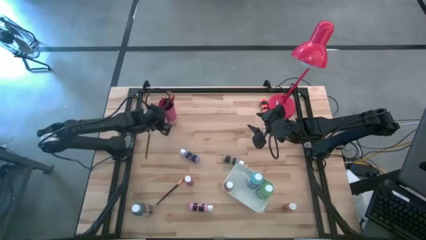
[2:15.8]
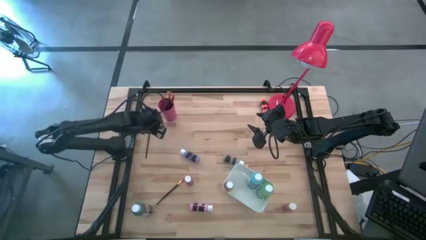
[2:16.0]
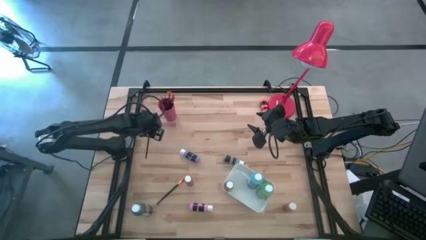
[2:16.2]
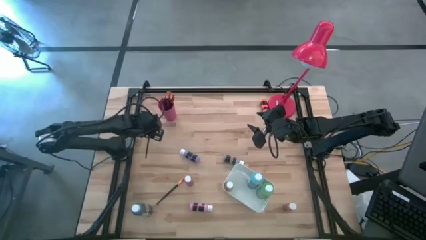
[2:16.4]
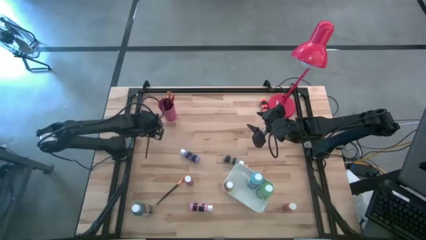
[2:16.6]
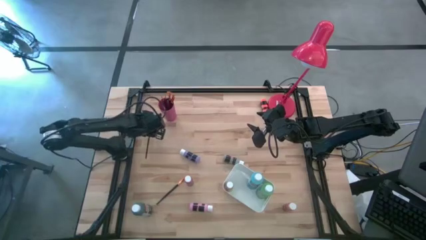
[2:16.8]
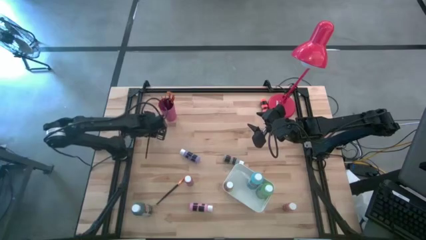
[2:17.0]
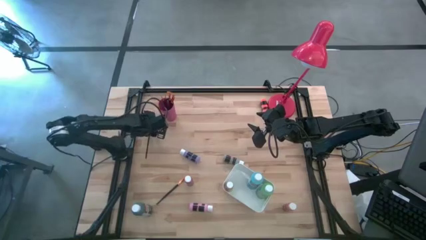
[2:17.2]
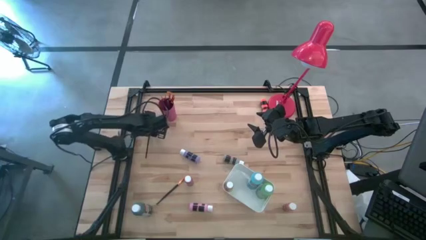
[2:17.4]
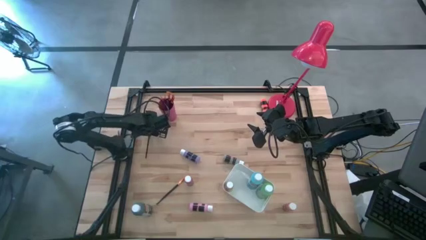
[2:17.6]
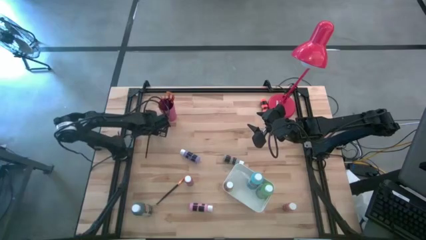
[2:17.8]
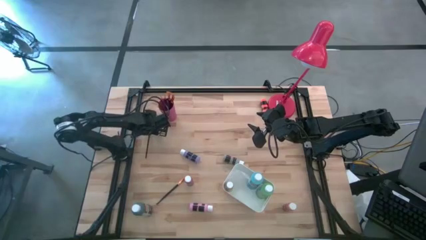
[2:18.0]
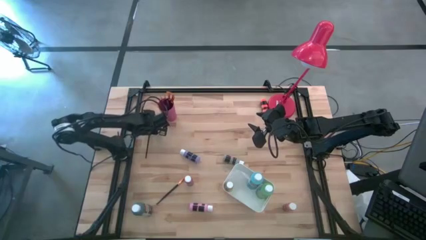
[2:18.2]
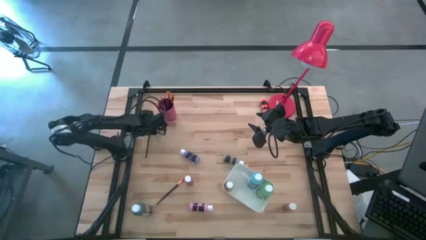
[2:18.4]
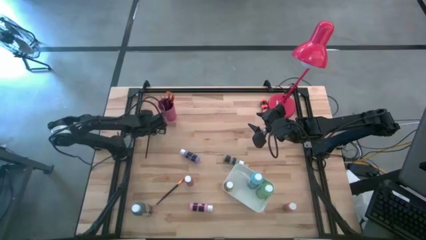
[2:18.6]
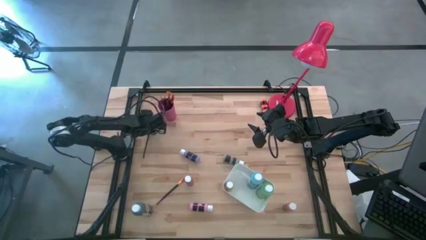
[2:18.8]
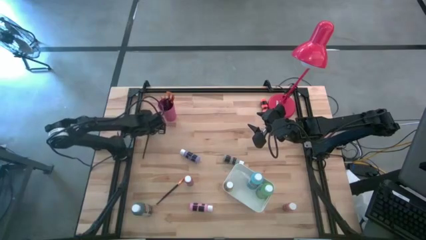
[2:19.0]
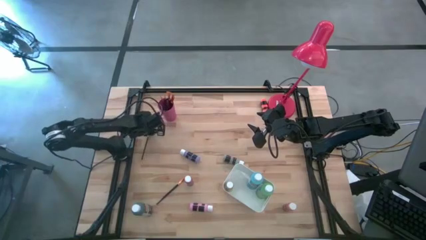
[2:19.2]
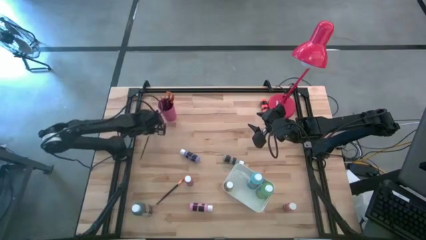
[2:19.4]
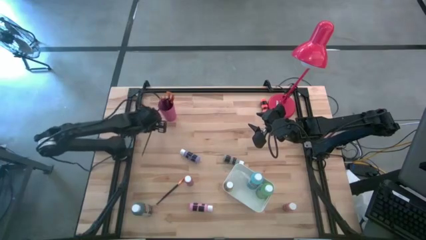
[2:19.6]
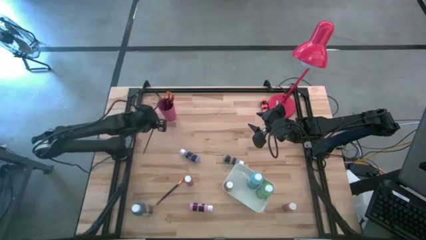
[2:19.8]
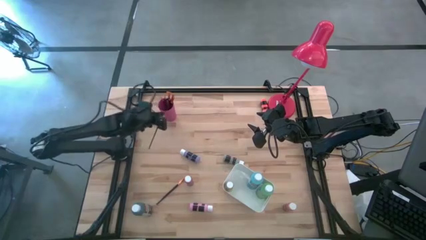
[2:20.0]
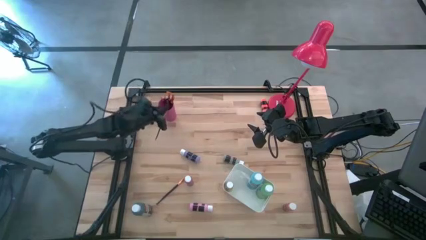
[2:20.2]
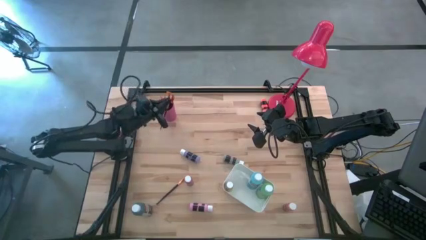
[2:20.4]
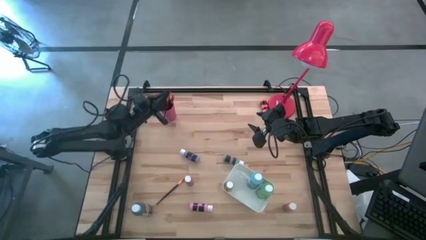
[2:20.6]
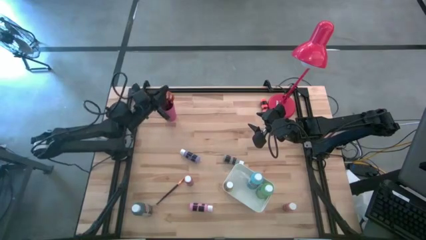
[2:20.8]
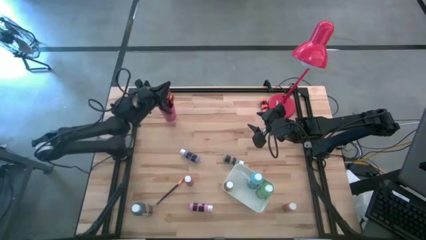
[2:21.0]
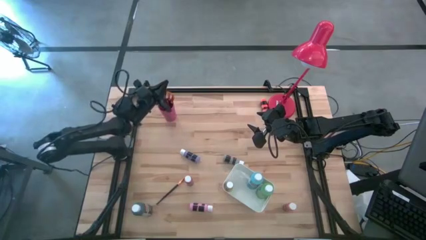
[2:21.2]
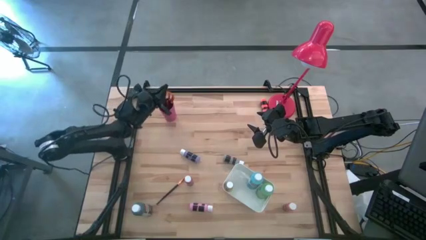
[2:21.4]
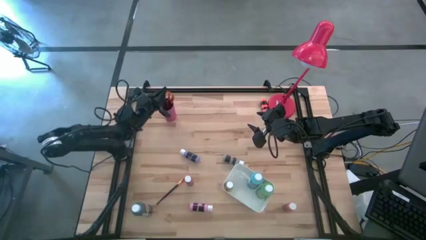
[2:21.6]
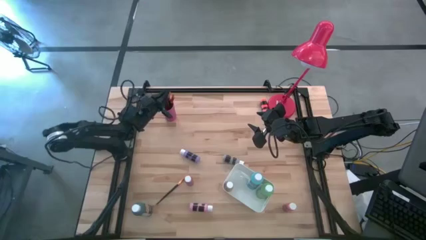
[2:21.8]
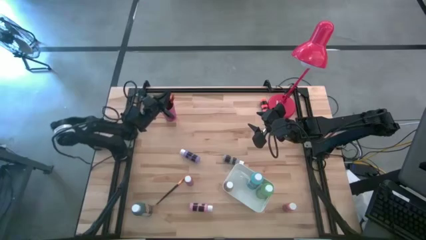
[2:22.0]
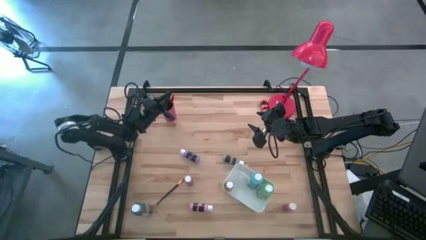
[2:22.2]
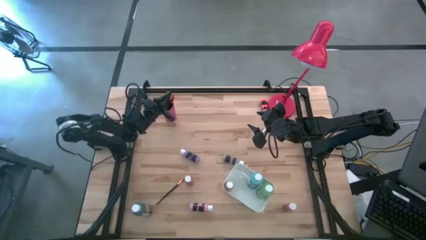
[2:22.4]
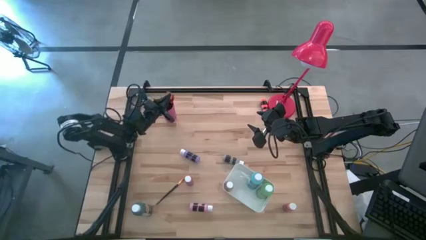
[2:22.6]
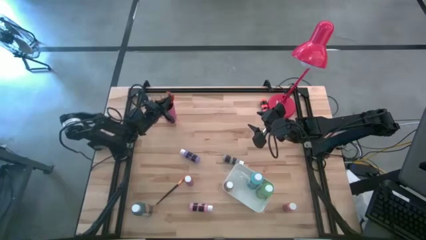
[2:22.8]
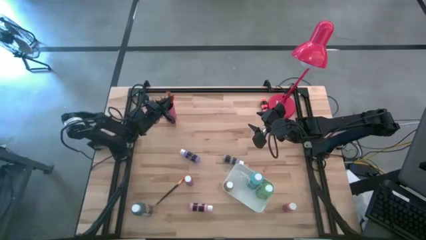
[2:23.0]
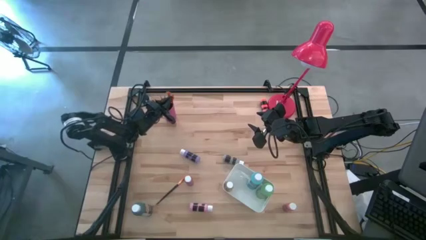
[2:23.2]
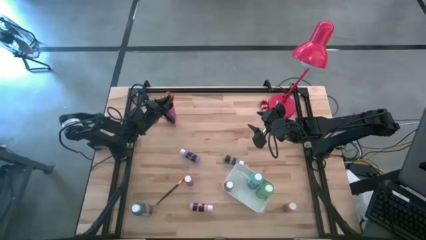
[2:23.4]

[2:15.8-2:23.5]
Task: Pick & Place Paint Supplies
Put the orange paintbrush into the pink cup

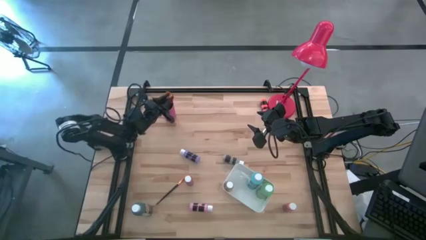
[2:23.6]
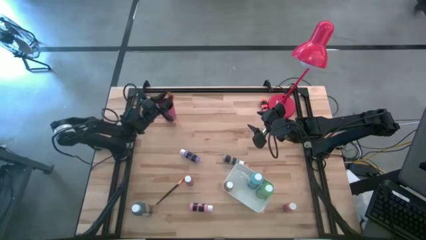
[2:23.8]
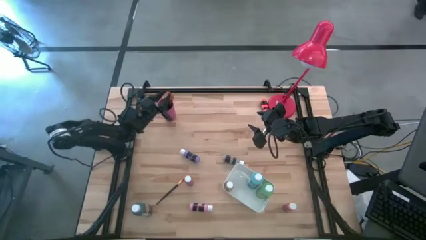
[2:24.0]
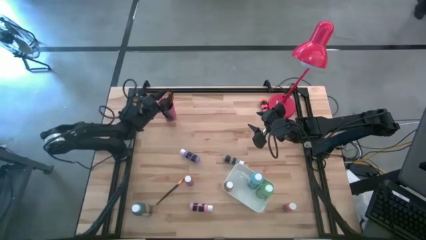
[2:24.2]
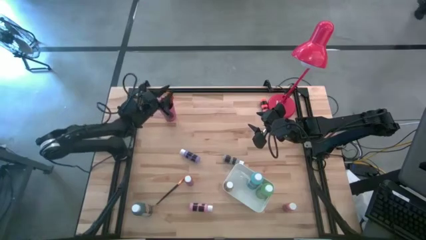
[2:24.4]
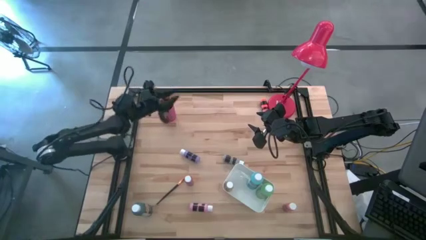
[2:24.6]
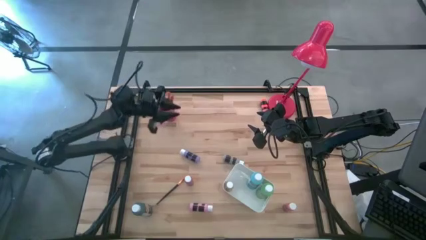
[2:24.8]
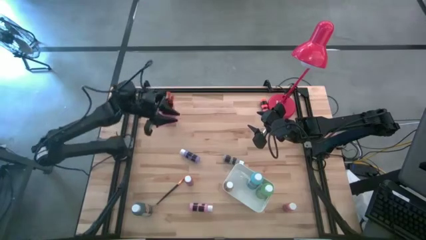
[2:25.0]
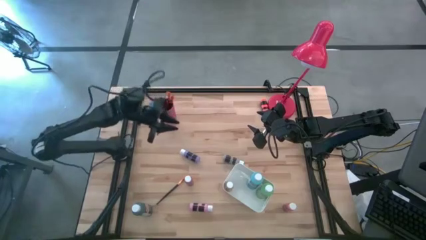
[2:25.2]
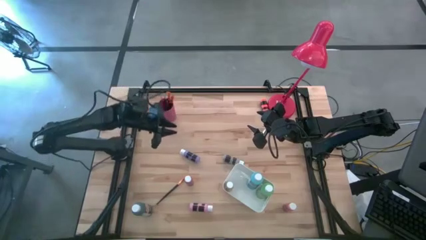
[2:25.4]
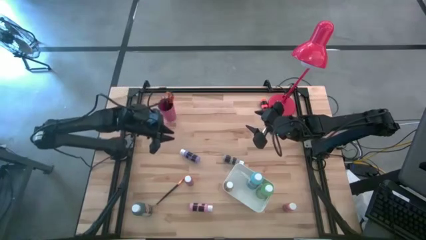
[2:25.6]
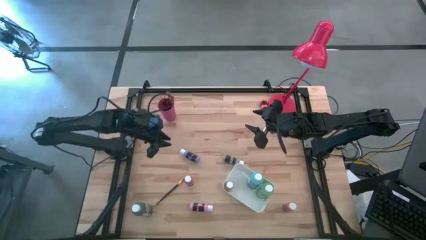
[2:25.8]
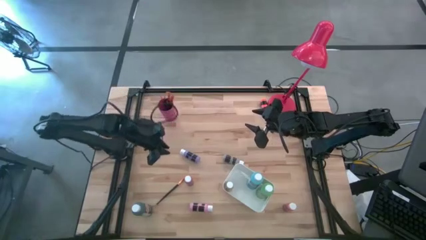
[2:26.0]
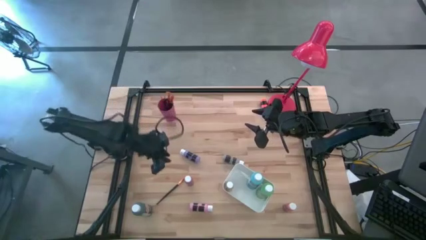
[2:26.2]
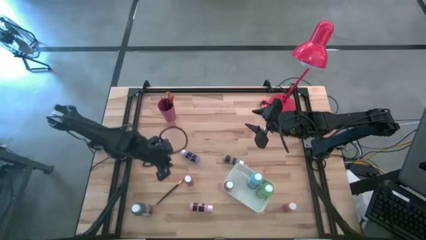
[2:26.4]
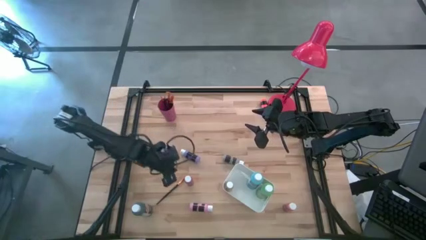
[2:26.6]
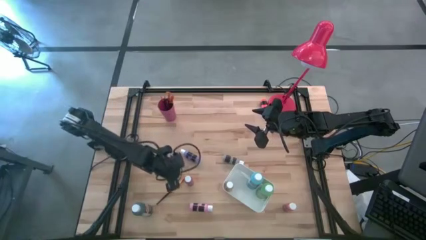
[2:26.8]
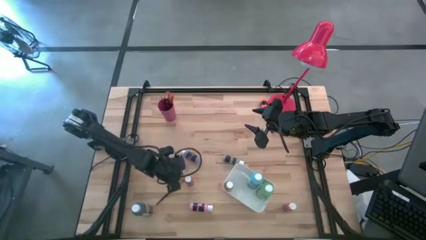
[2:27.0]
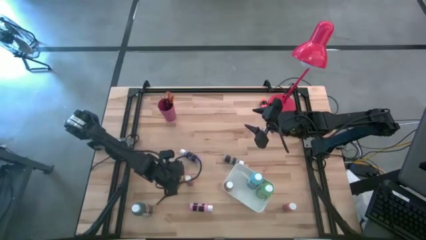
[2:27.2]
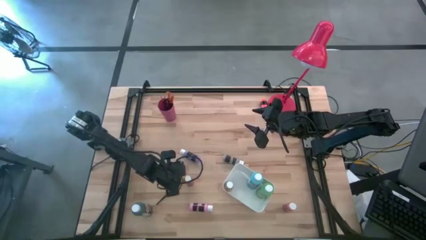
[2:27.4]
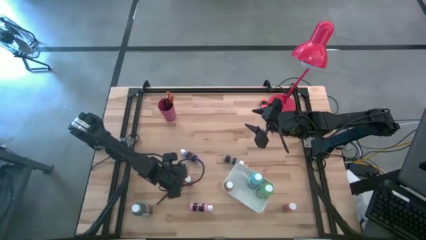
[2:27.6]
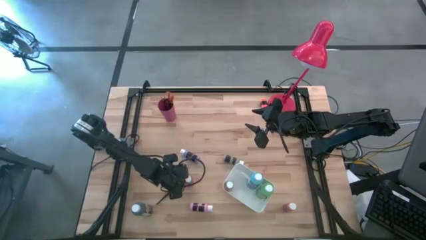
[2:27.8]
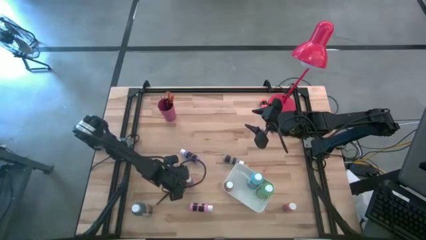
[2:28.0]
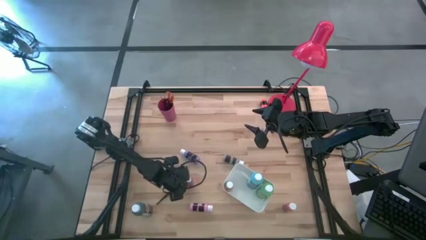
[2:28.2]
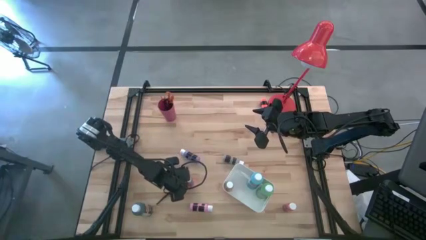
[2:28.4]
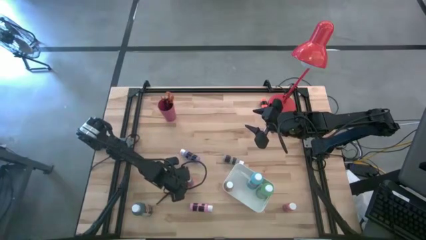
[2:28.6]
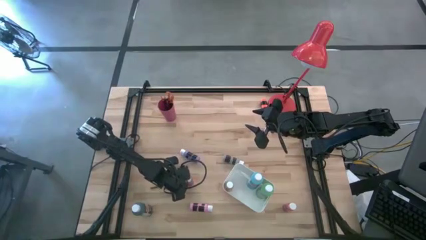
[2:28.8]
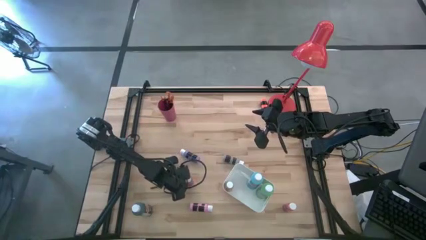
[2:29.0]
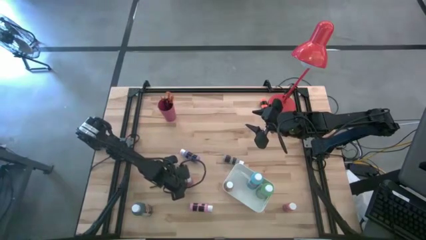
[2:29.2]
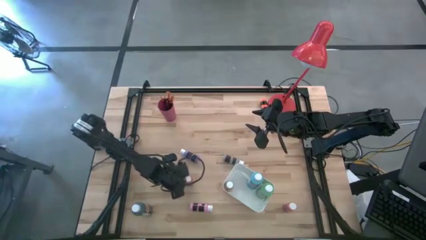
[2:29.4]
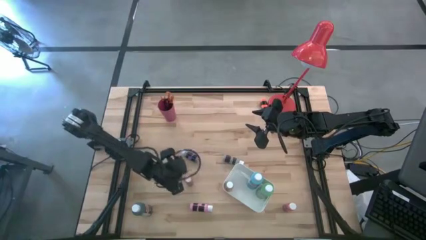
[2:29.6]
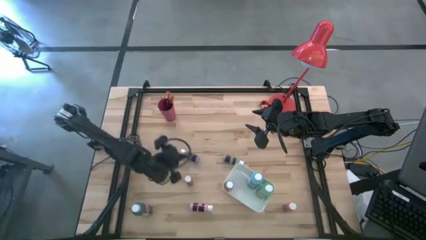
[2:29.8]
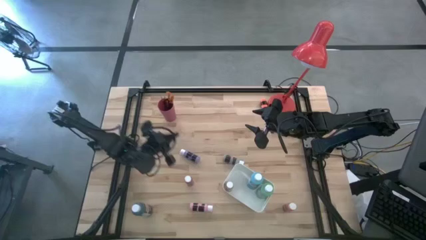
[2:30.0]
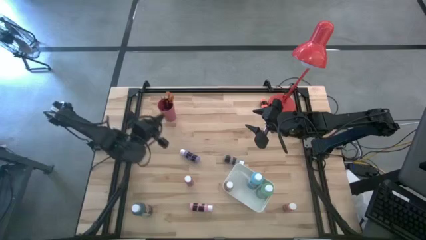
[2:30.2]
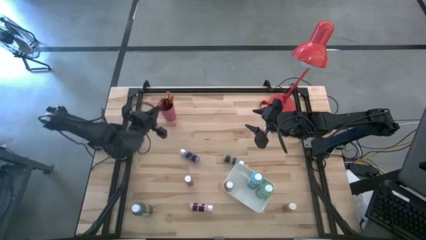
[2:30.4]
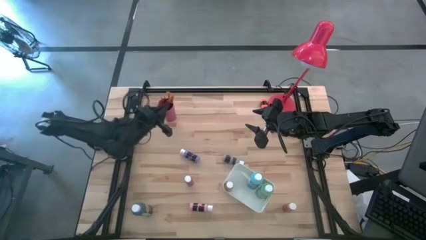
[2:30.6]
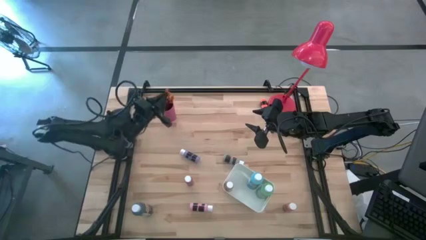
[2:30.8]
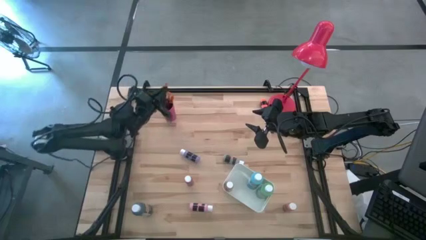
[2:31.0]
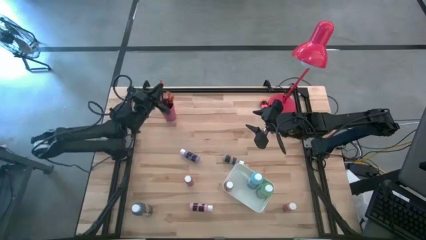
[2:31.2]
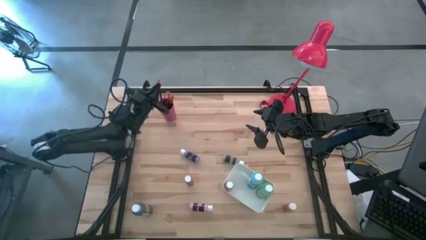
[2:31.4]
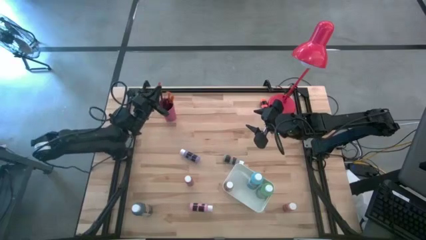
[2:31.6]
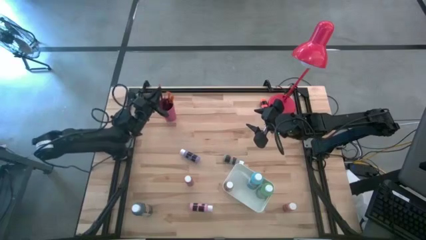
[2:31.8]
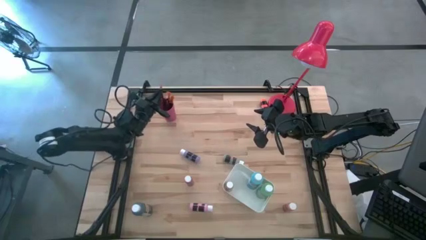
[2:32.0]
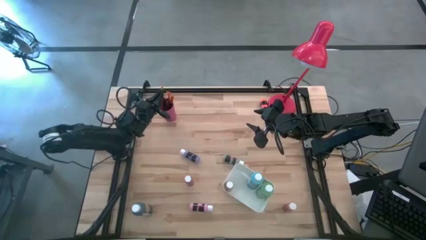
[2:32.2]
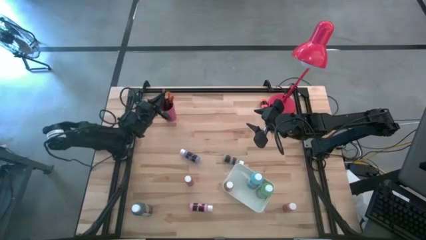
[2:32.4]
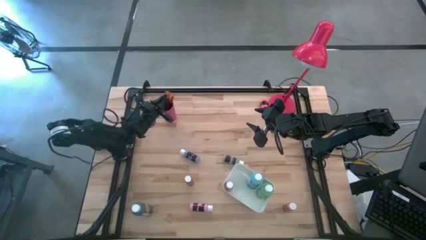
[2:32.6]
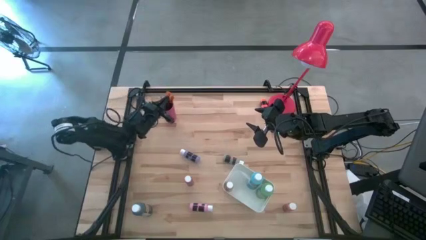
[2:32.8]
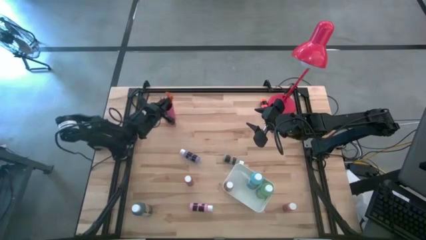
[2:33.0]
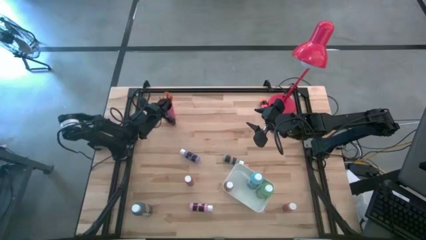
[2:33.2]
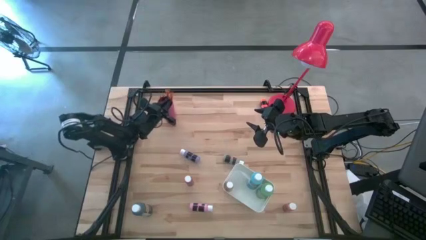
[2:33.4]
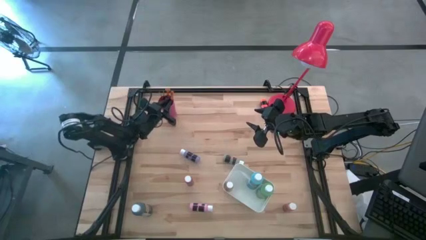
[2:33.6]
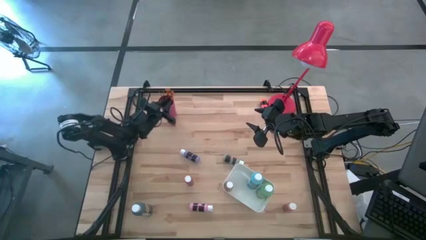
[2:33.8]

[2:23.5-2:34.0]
Put the orange paintbrush into the pink cup
